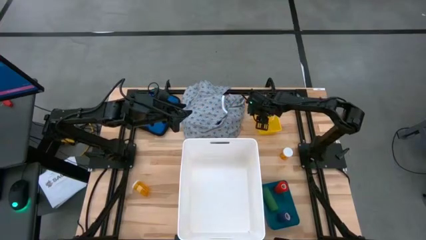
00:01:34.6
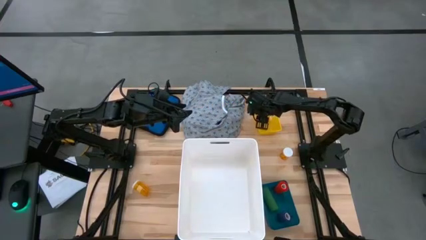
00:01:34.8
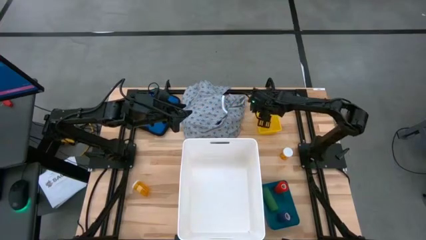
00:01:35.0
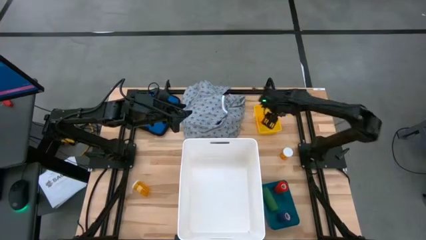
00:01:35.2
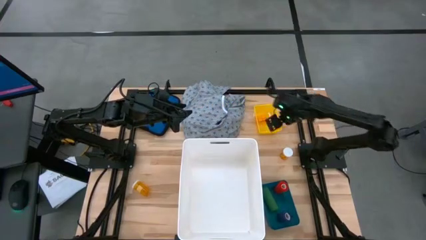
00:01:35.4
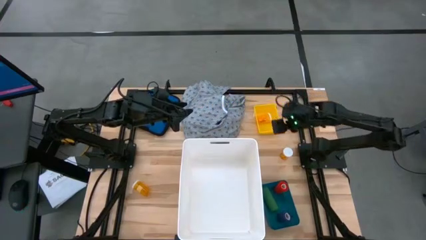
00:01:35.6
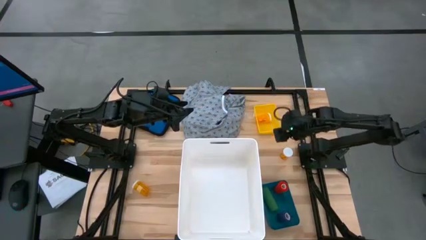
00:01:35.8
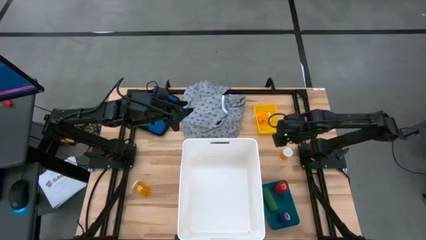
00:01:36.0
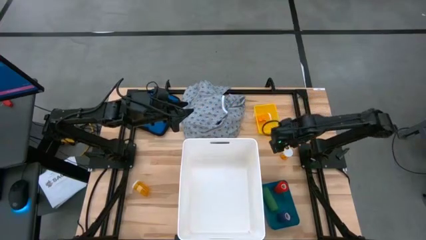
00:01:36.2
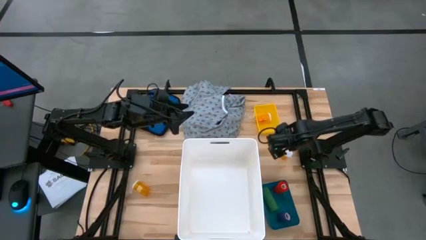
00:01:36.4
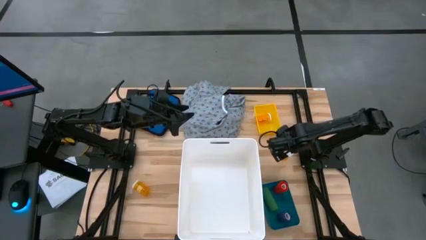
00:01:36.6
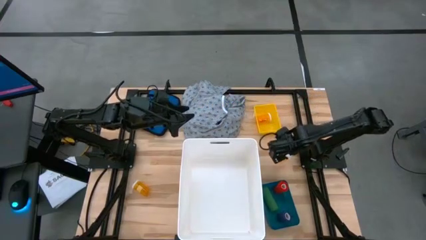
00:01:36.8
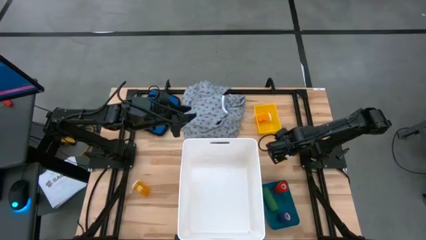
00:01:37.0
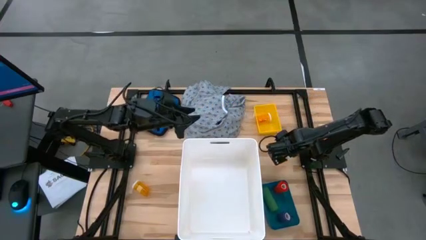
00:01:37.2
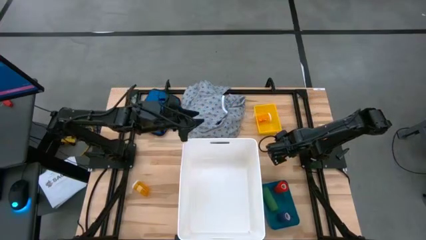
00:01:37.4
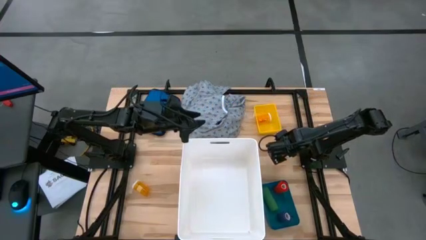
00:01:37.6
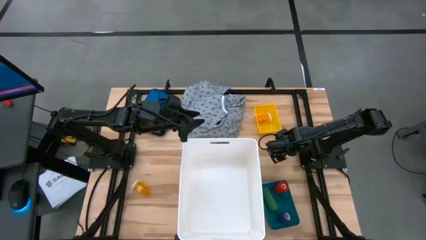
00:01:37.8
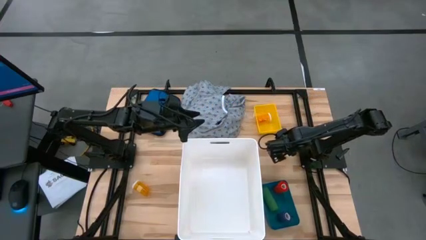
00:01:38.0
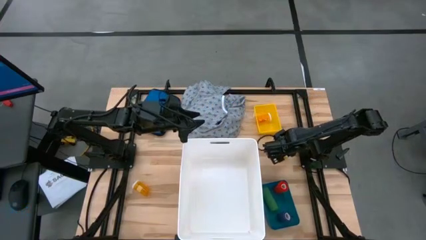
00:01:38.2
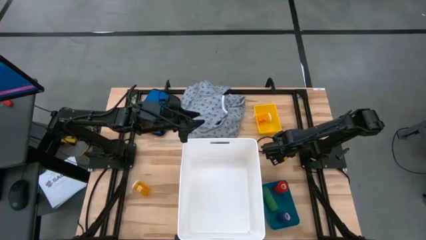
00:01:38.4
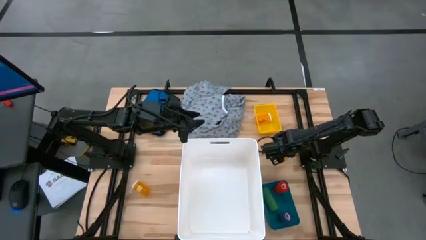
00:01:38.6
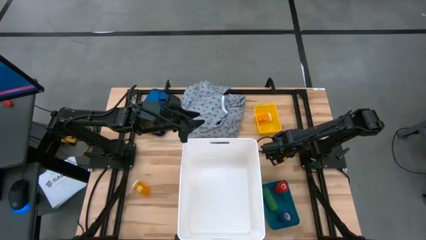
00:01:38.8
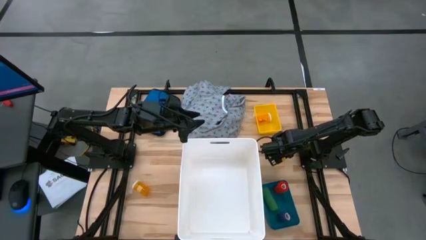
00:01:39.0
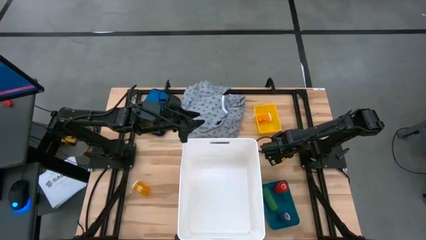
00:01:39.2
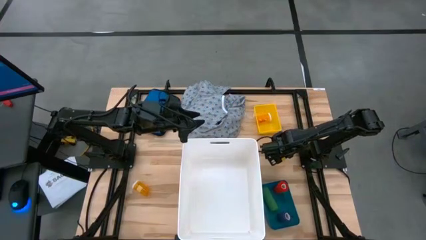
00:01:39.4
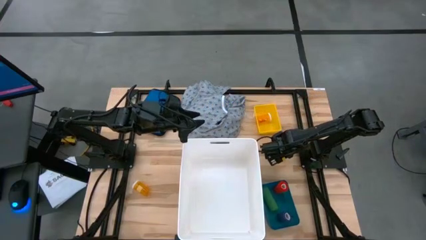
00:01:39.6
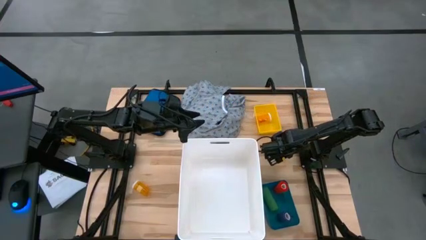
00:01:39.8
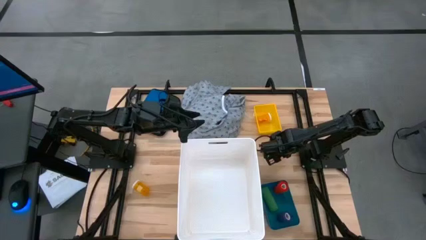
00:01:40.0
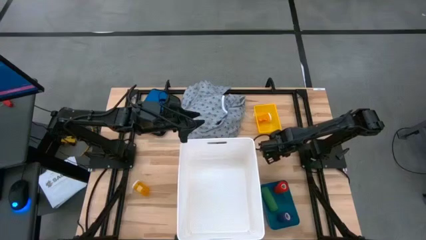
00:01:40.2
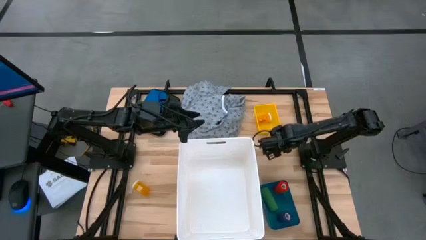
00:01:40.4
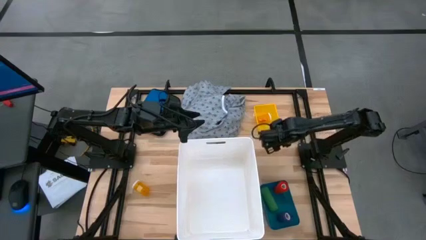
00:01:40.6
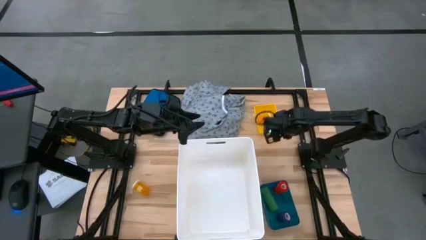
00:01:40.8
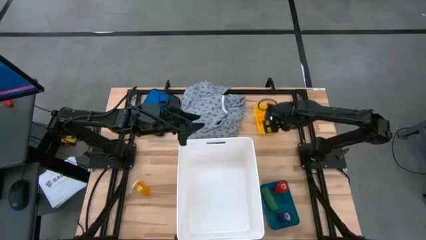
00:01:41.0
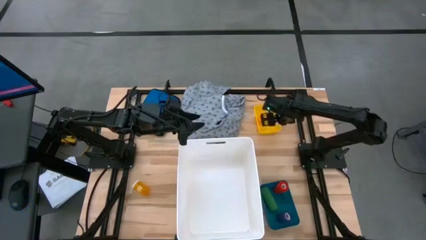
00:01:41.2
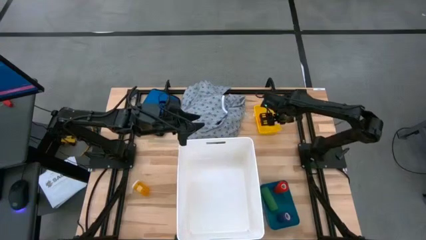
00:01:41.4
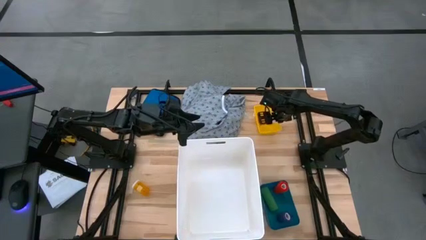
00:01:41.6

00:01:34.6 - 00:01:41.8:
Task: Pick & place medical supplies in basket/bin
Put the top right orange pill bottle into the yellow bin

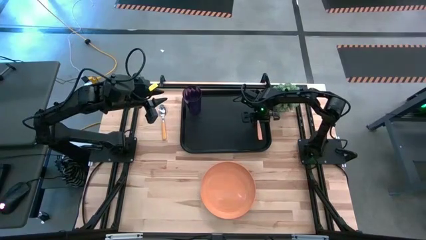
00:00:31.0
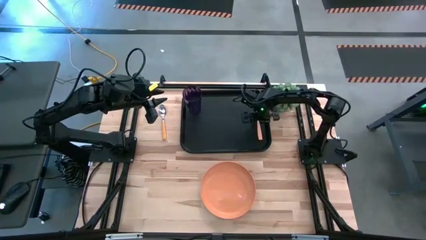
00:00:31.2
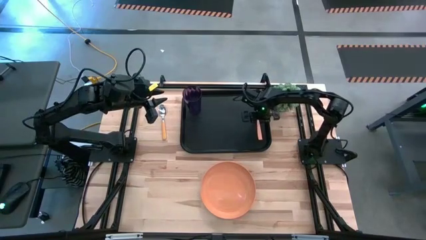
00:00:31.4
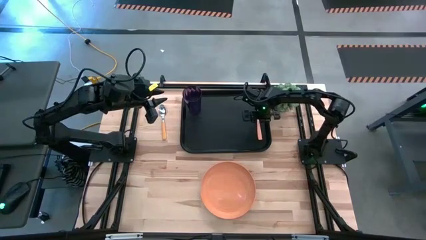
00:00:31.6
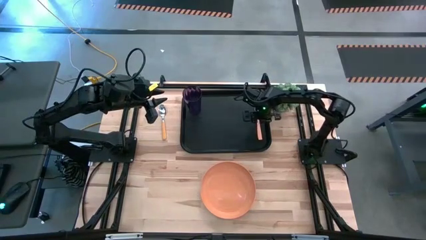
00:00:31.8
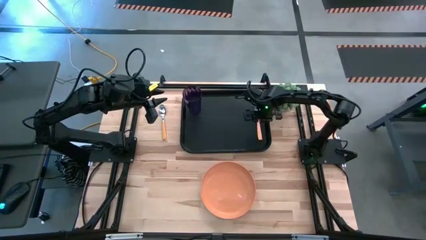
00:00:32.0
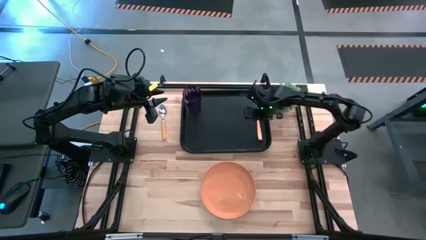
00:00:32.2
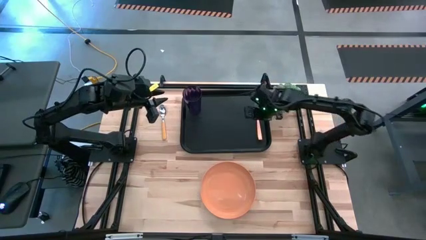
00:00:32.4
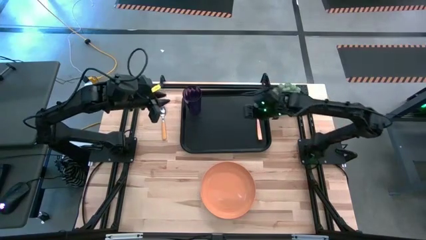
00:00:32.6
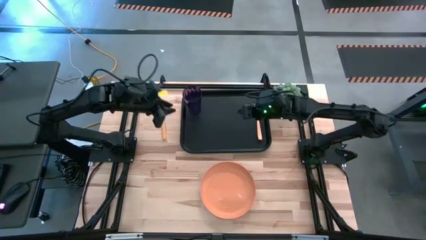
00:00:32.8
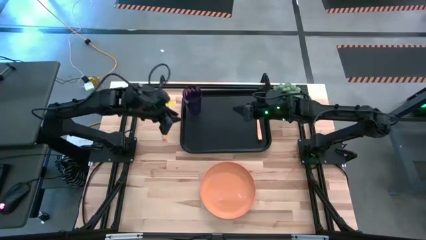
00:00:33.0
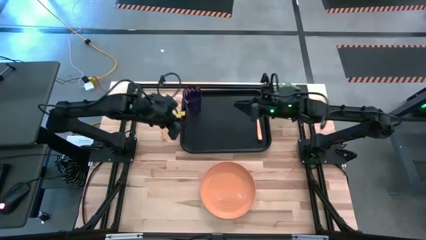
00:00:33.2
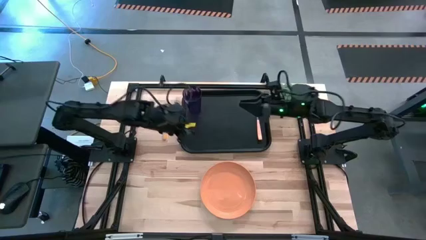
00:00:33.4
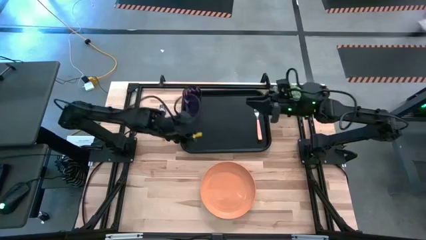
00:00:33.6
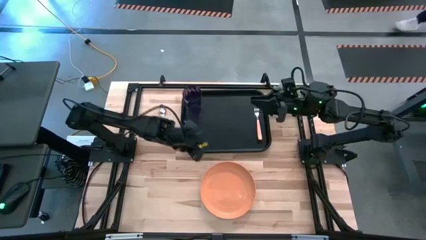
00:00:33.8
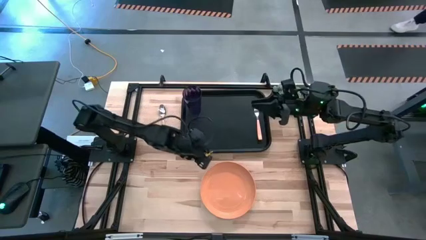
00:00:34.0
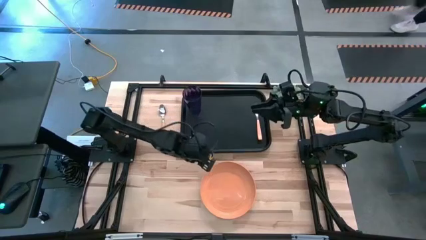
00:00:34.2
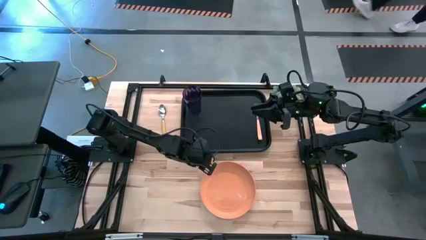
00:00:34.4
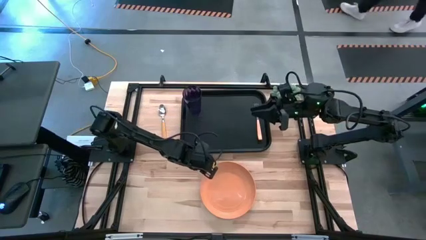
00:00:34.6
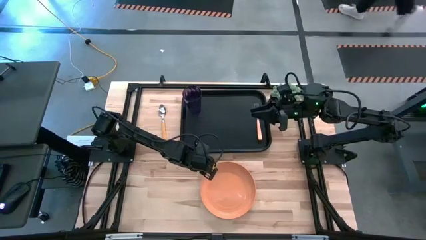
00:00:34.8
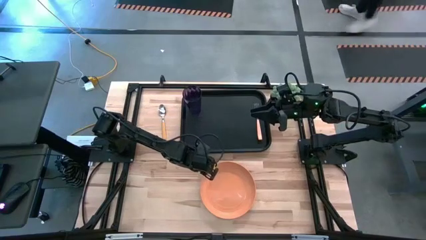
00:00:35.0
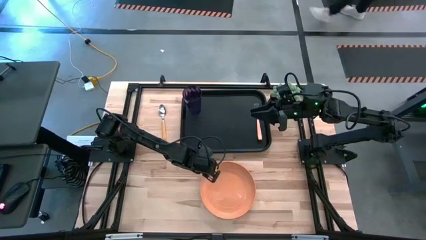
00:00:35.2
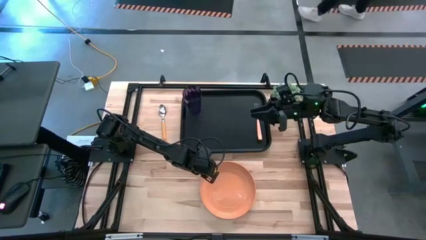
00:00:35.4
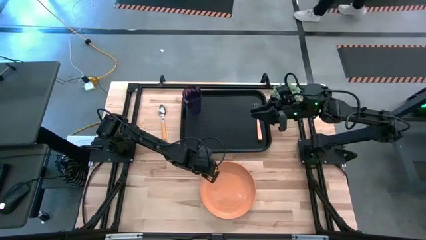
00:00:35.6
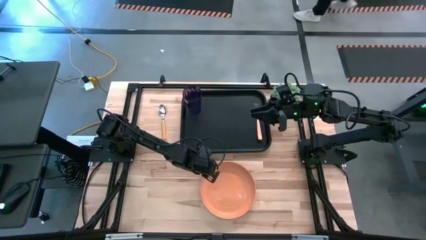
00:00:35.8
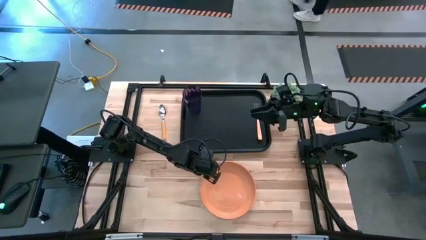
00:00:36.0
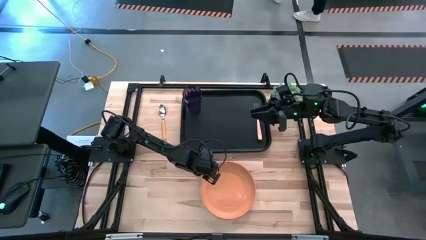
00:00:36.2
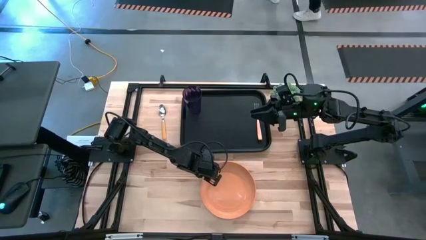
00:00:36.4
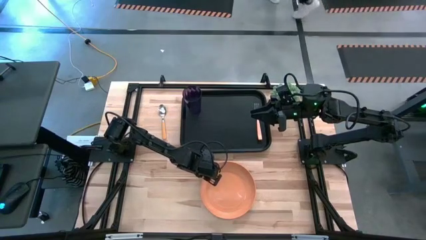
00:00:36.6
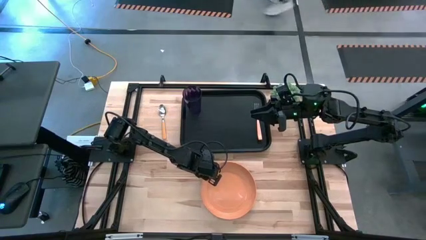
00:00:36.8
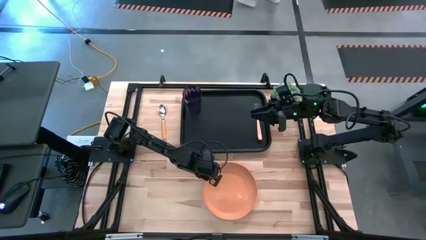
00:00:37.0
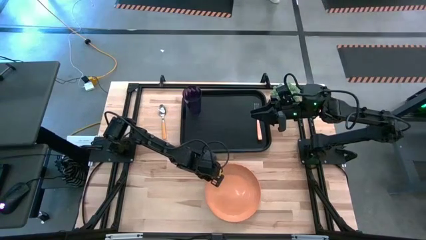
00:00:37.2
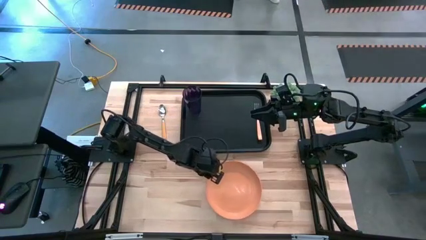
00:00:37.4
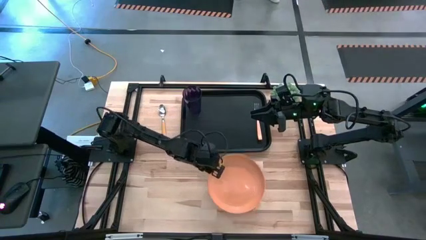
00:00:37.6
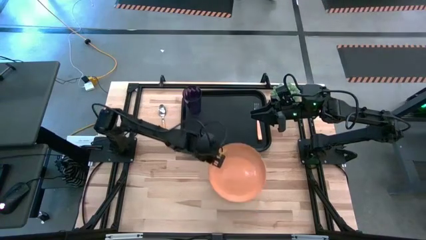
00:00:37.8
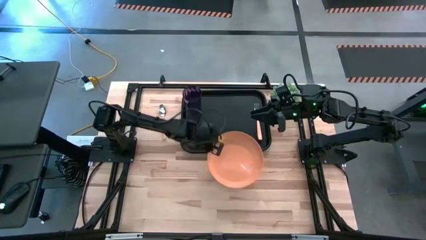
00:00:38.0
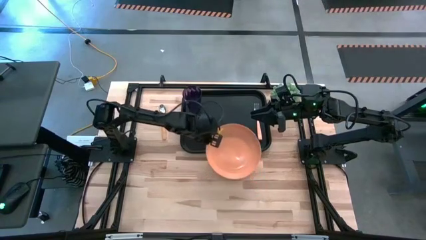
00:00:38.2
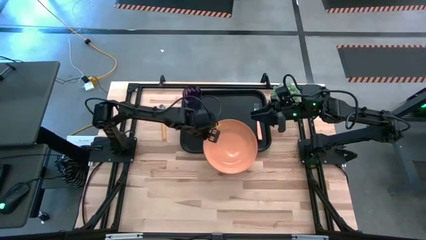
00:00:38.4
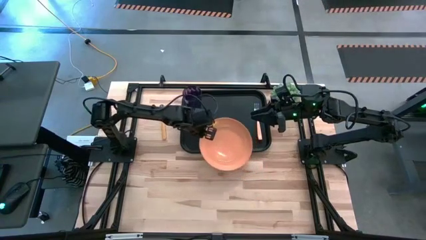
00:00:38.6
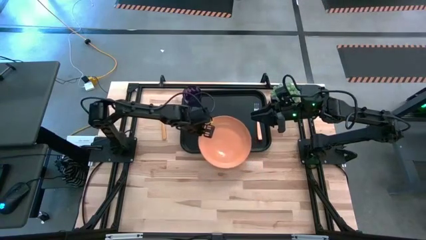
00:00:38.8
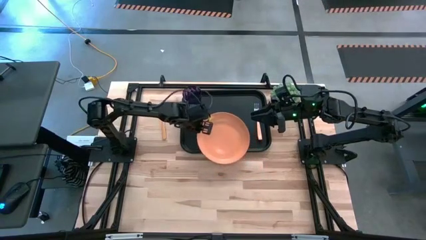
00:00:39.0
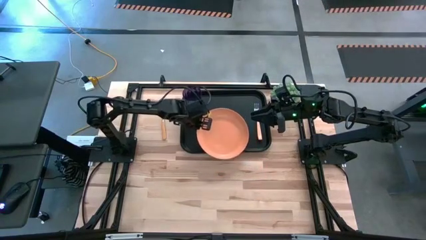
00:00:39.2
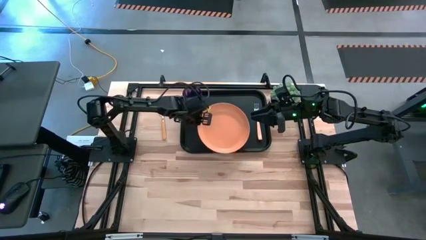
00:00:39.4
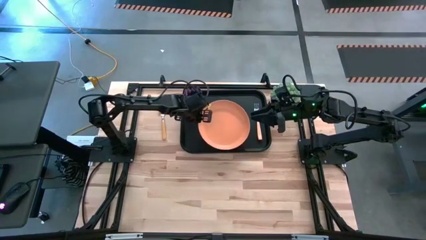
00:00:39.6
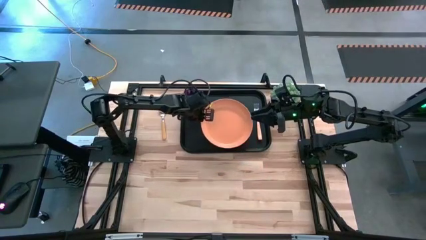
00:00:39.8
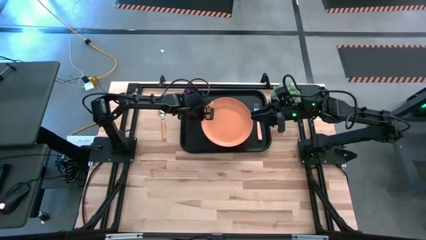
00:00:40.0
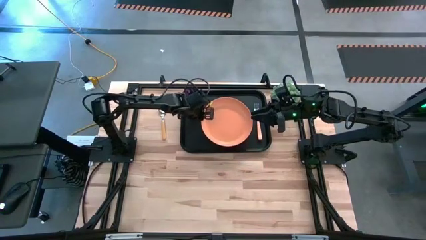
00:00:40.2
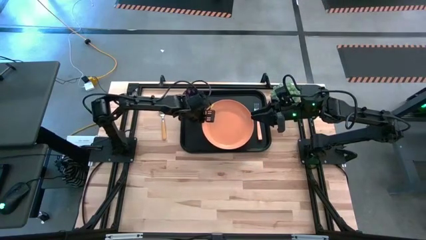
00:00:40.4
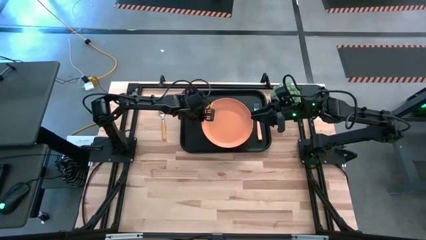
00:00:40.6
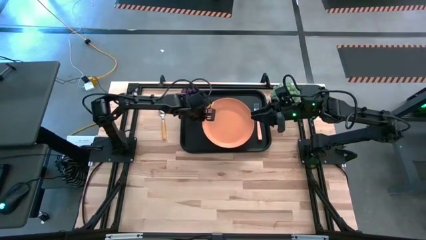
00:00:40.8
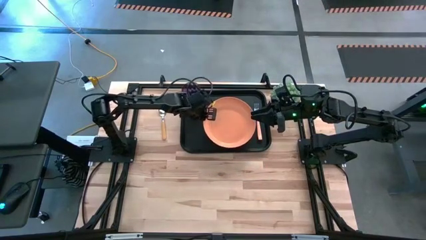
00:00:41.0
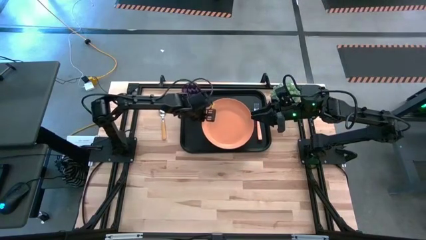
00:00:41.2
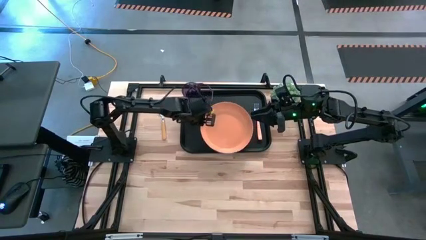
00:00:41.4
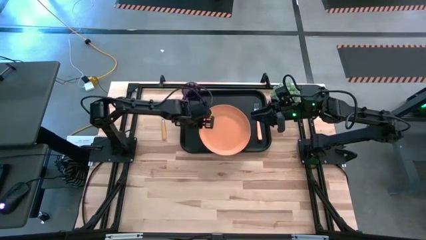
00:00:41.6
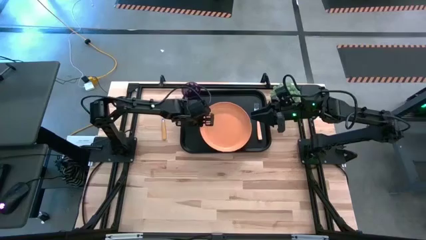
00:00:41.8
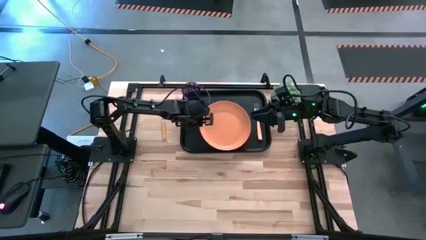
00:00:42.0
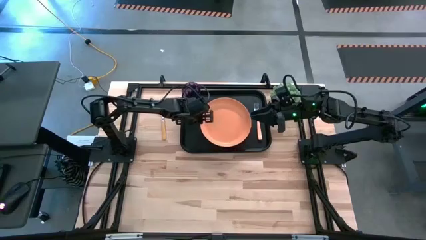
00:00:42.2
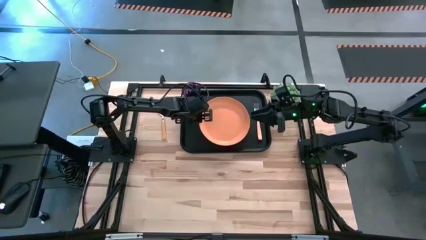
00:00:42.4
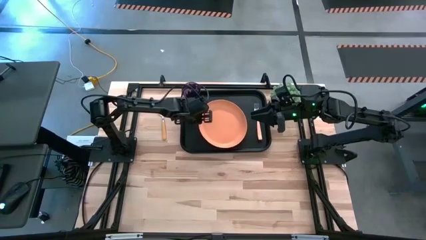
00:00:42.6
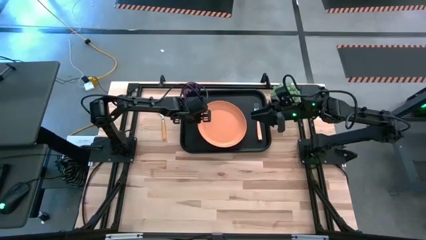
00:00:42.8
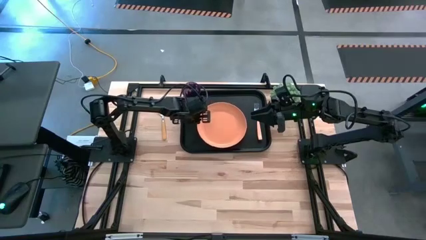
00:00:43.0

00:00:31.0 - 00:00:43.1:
Task: Pick and place plate/cup/fork/spoon on tray
Put the orange plate to the left of the orange fork on the black serving tray
